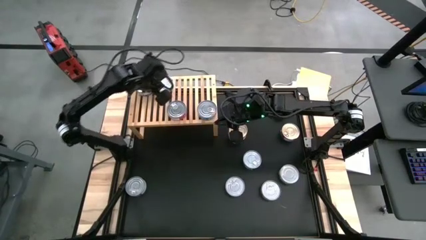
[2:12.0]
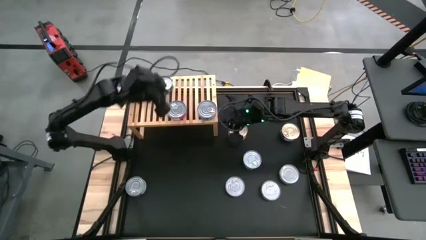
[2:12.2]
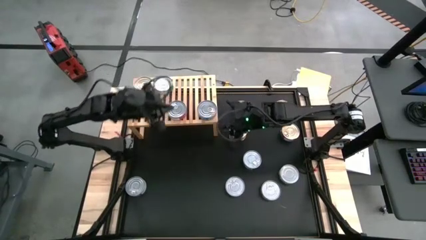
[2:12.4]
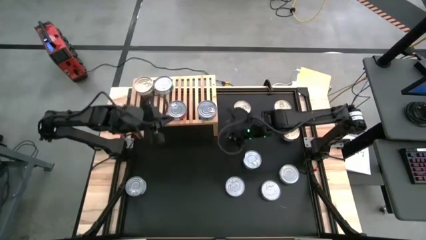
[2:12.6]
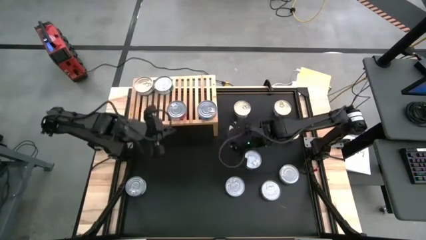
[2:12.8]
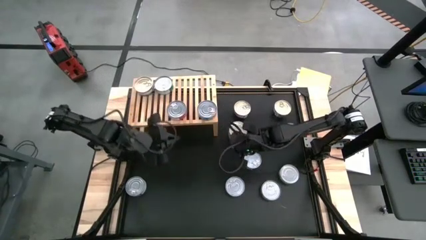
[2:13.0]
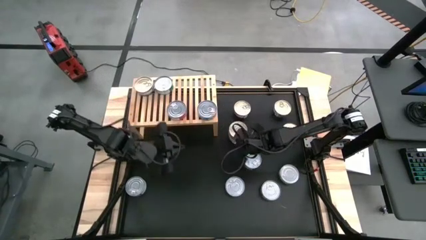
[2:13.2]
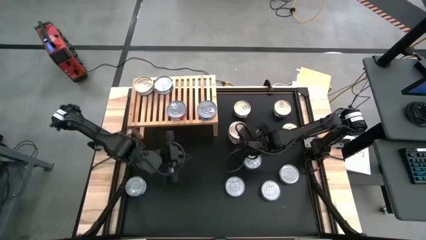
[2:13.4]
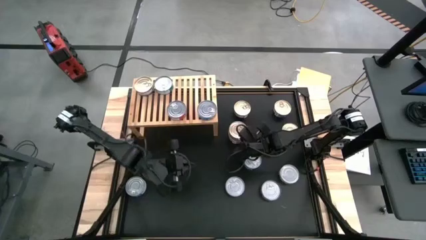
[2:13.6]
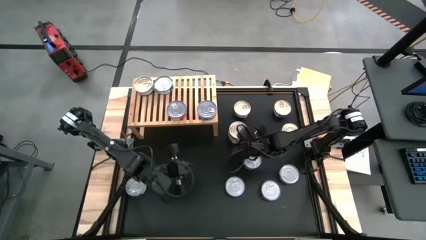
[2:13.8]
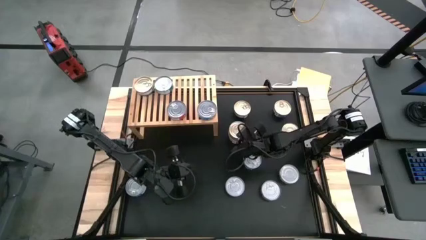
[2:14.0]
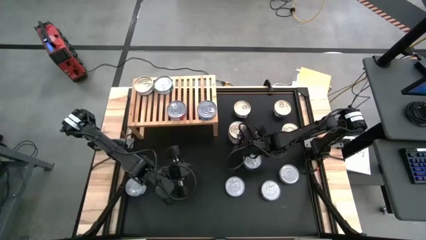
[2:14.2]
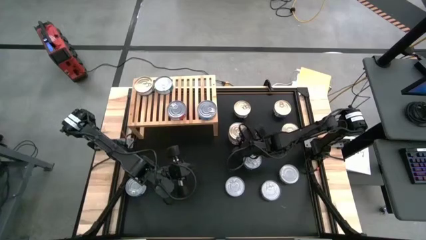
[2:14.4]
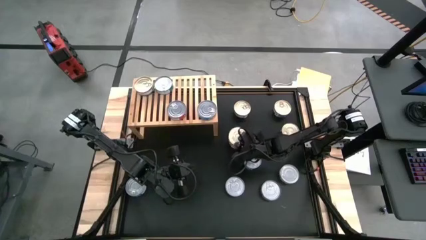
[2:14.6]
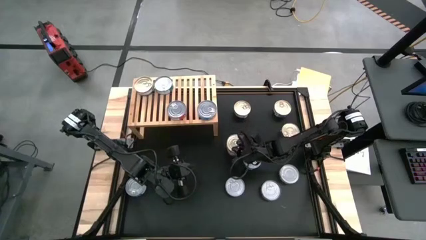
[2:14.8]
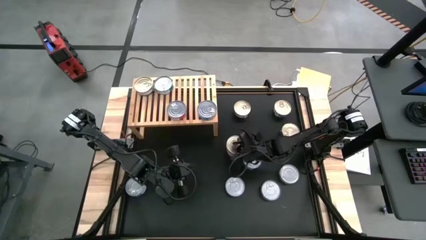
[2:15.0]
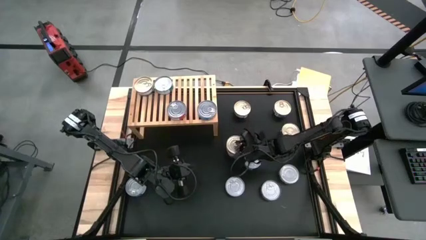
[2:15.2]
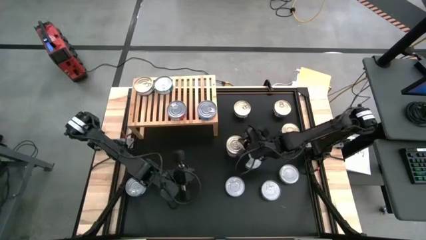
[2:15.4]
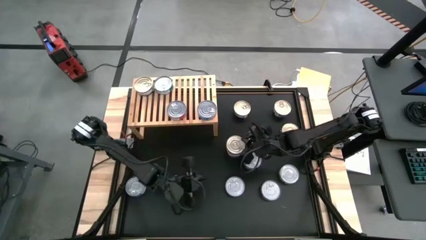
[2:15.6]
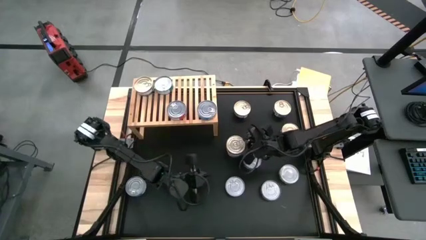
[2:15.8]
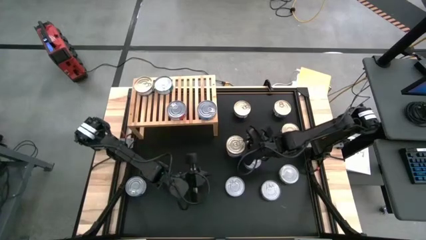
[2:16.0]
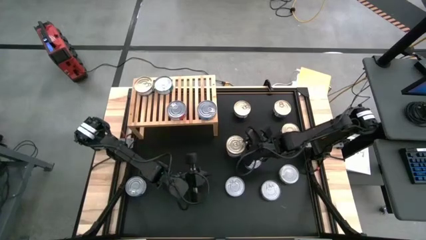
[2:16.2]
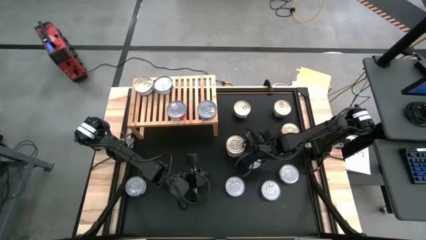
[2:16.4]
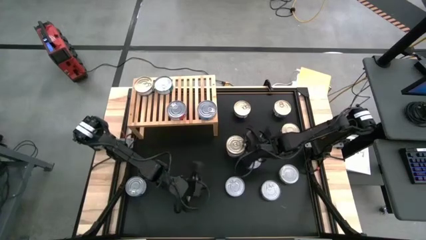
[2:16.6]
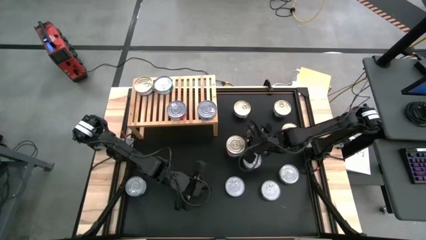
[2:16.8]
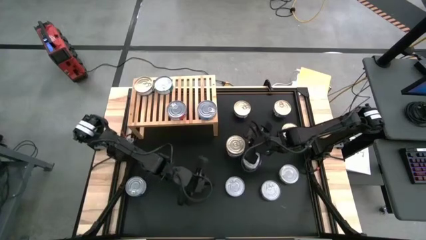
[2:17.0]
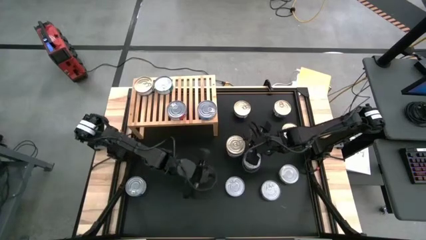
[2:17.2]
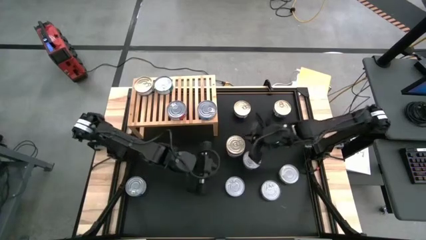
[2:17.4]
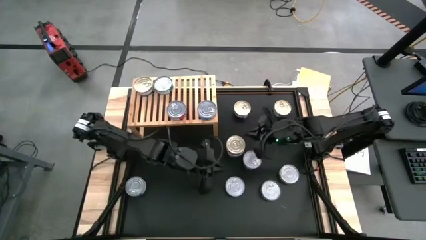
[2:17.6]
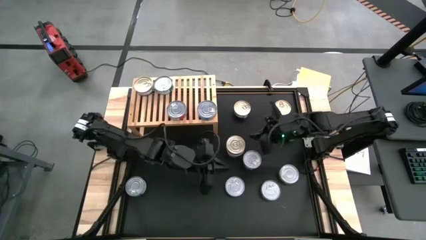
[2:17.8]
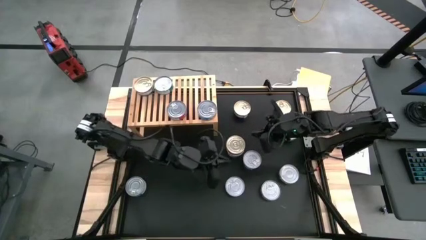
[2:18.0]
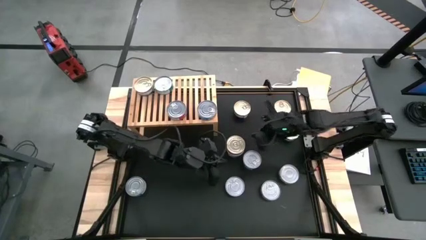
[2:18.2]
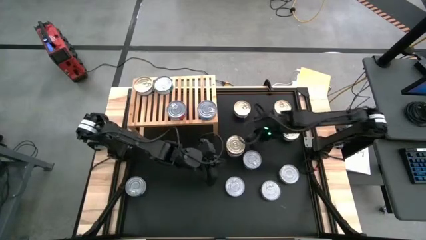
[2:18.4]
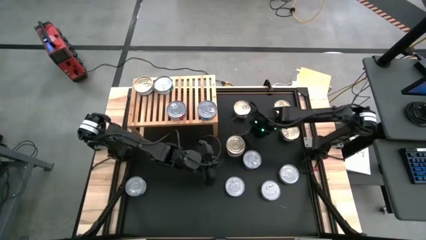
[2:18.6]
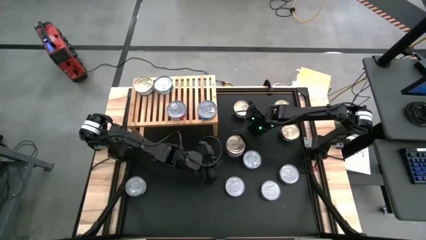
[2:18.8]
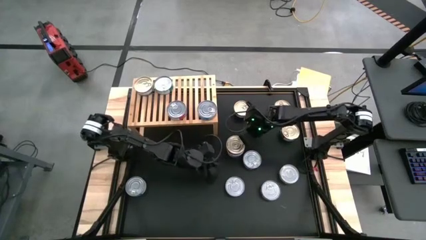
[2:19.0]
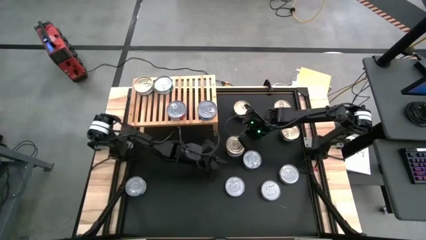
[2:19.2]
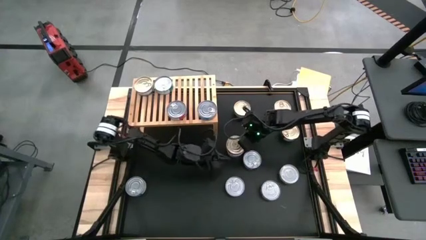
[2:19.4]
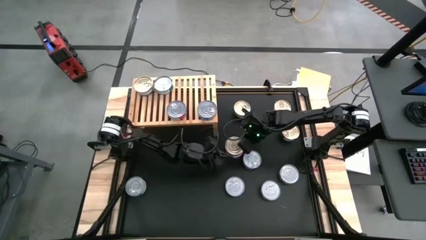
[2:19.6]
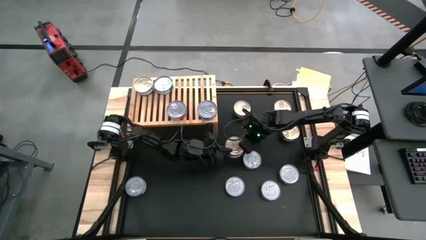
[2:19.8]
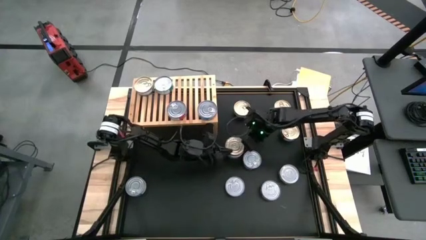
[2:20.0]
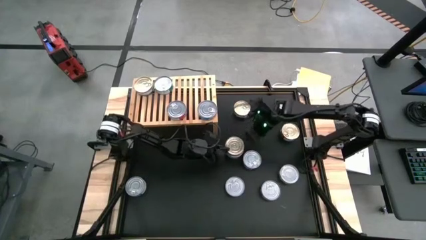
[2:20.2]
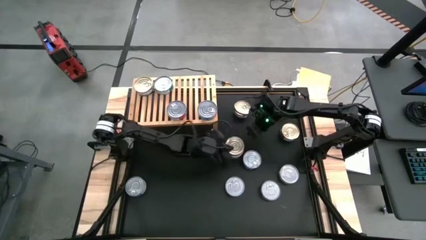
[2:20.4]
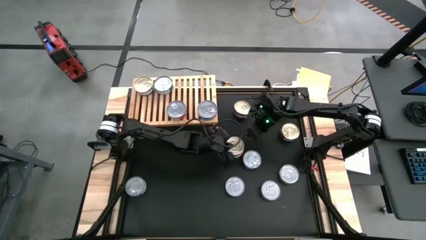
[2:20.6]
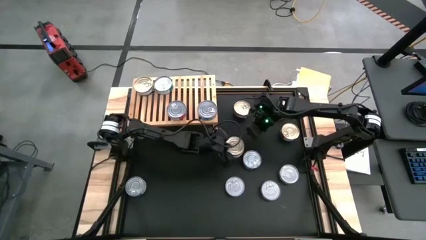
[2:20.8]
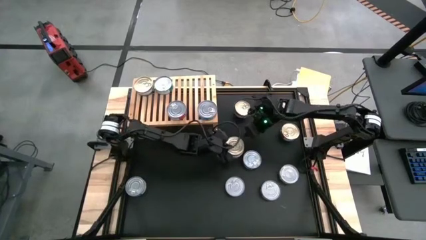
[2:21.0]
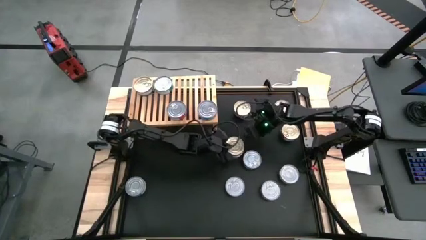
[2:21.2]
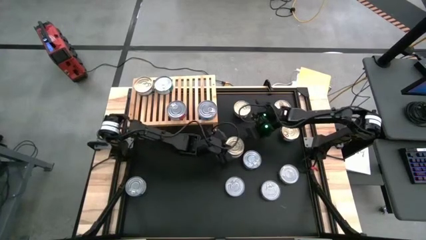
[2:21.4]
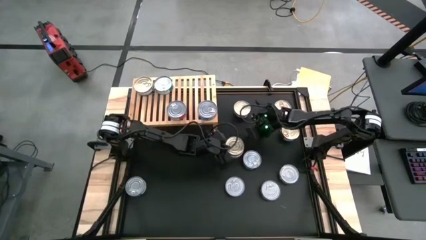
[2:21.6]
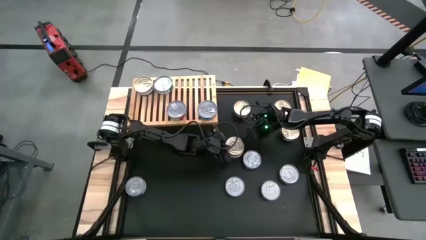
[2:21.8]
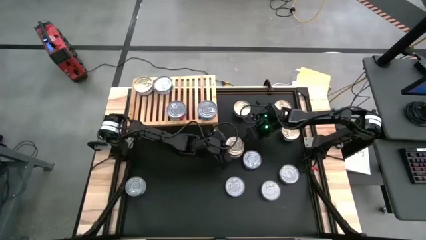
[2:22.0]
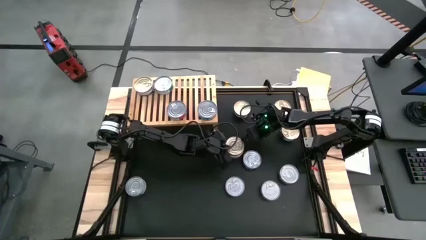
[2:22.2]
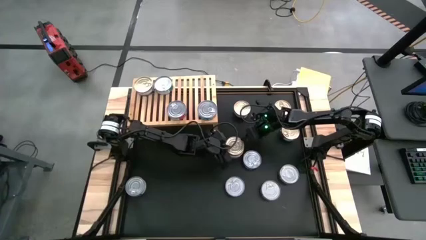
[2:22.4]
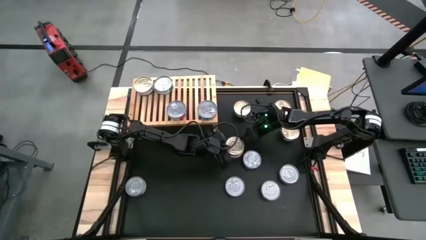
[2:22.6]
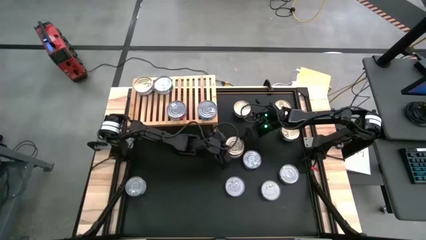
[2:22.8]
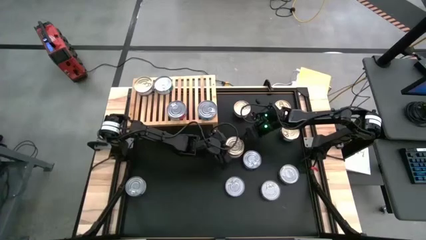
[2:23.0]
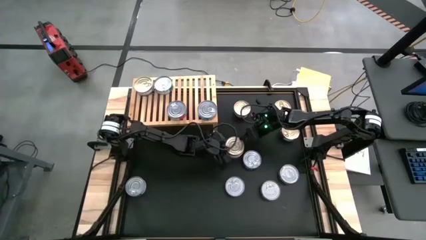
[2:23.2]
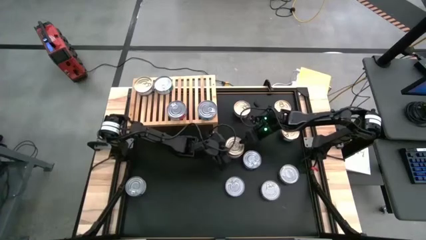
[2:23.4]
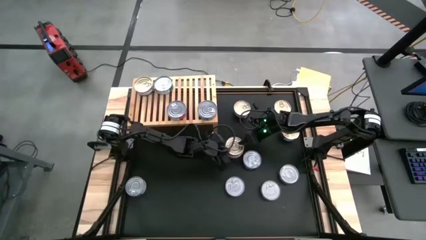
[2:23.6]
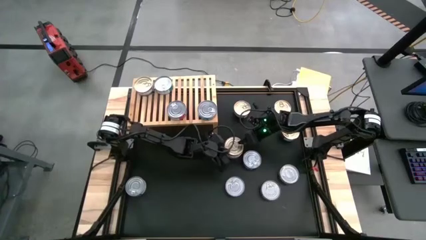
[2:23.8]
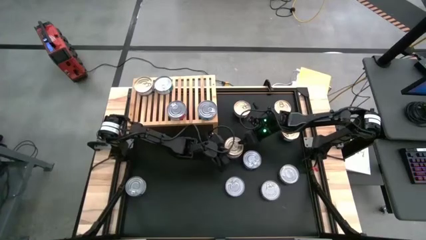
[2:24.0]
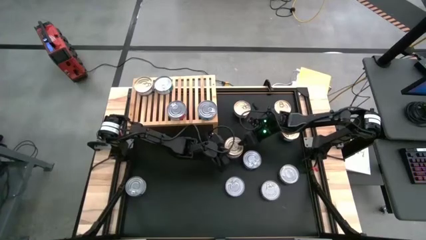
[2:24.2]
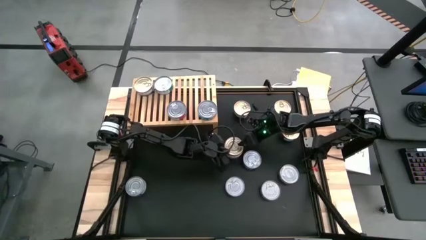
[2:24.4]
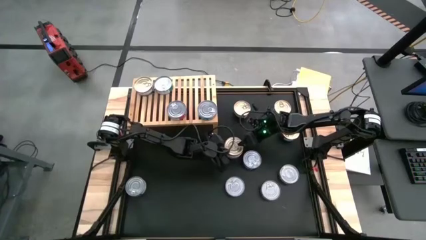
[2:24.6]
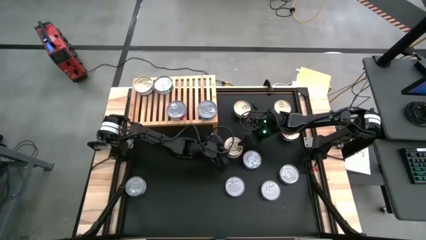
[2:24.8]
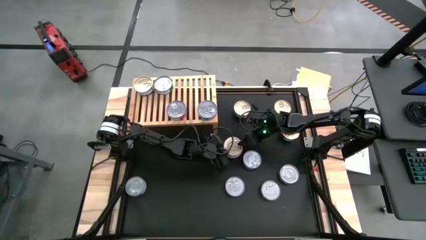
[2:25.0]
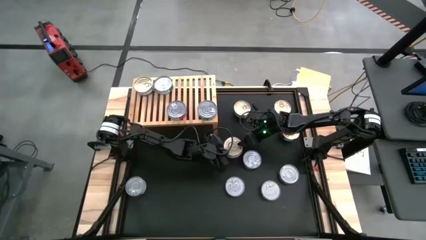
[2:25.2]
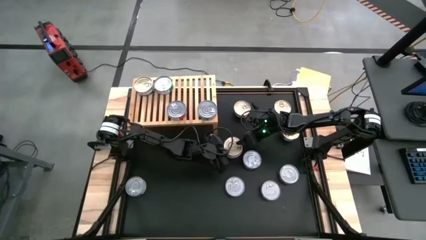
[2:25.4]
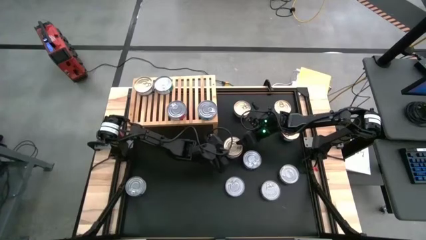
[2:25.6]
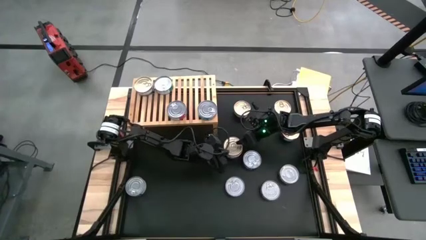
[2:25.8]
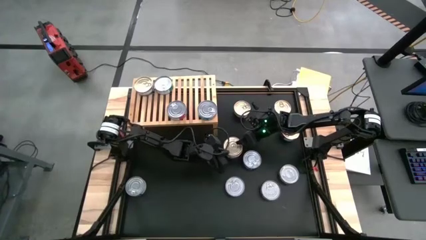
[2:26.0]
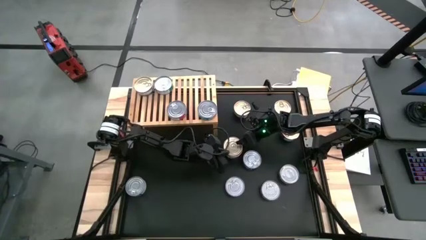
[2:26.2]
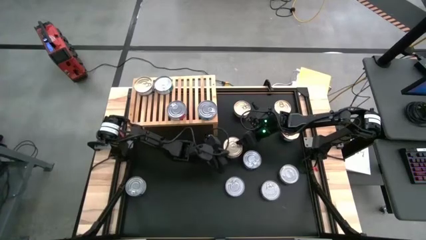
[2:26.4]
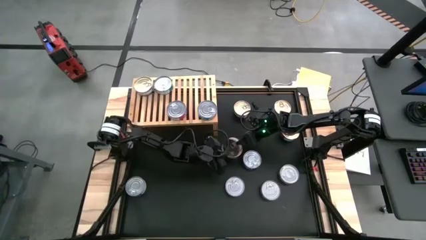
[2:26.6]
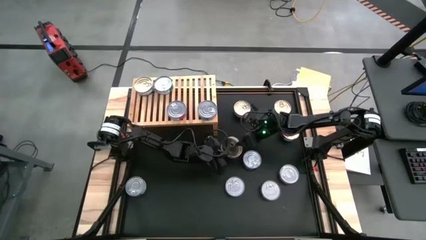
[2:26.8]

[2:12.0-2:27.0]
Task: Stack canned seafood by type on shelf
Put the blue pink tuna can on the shelf

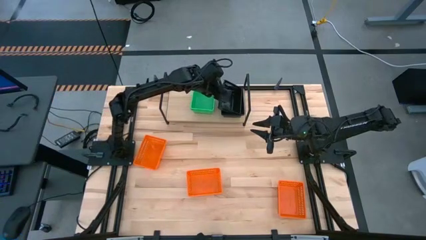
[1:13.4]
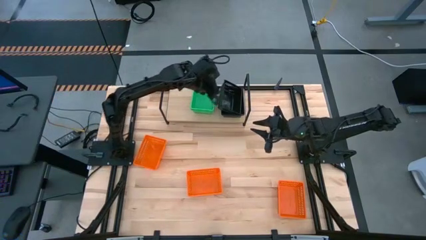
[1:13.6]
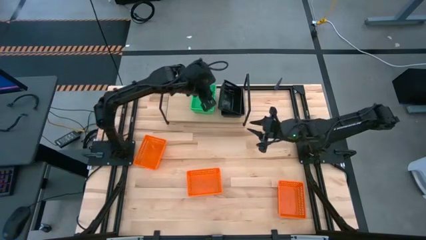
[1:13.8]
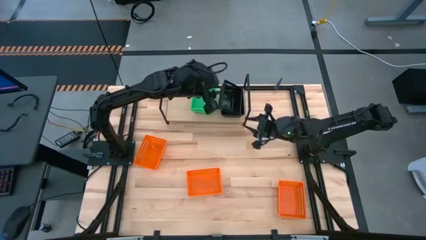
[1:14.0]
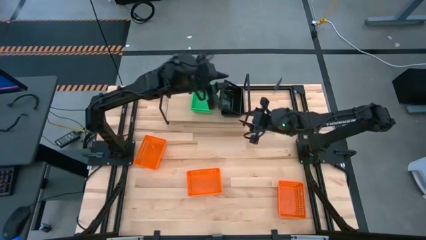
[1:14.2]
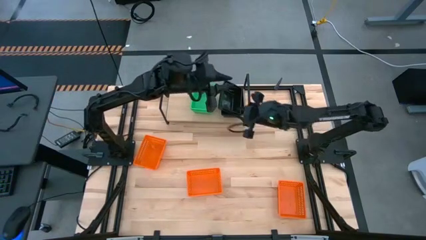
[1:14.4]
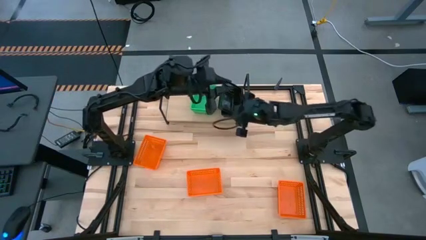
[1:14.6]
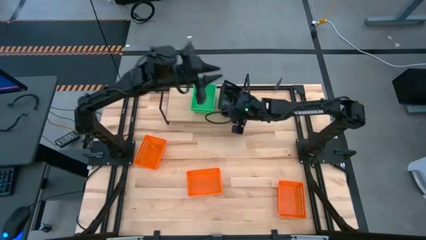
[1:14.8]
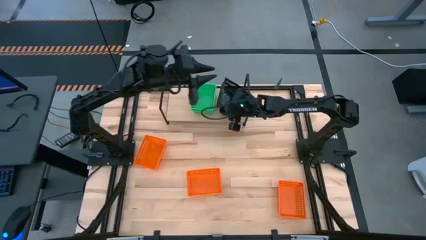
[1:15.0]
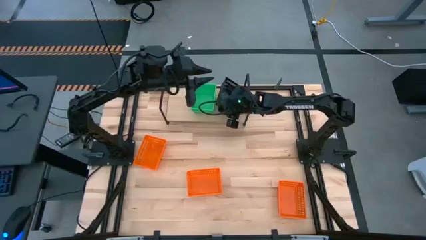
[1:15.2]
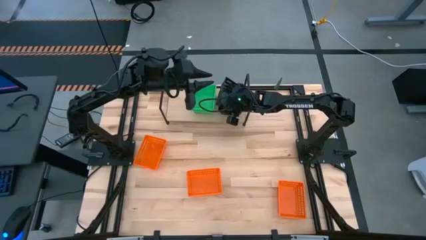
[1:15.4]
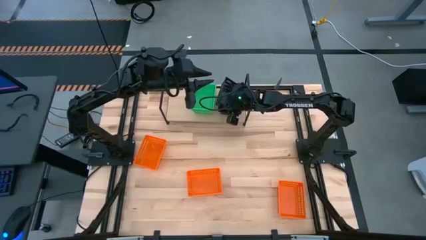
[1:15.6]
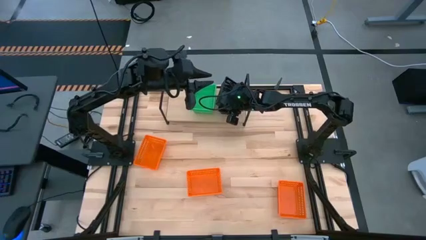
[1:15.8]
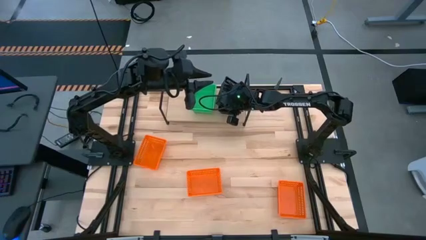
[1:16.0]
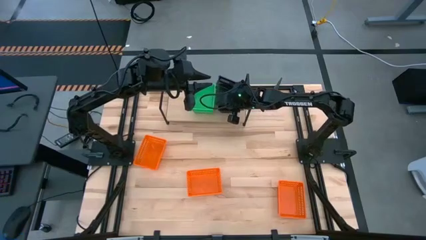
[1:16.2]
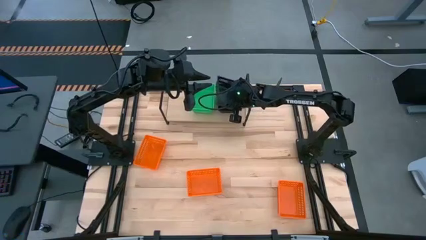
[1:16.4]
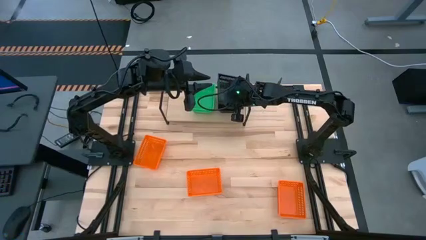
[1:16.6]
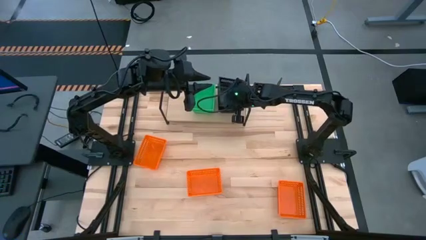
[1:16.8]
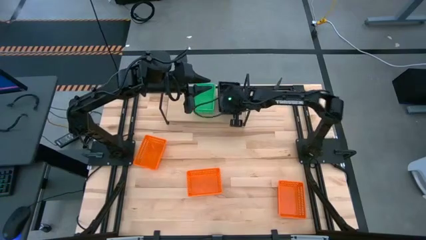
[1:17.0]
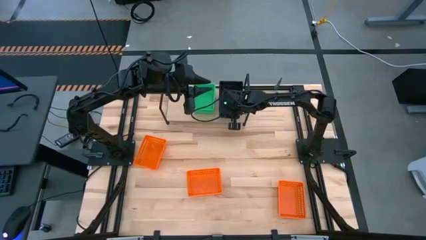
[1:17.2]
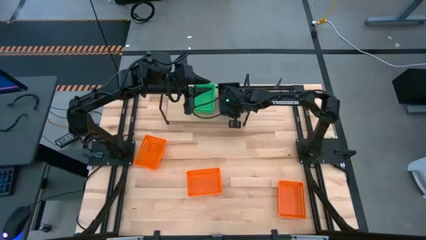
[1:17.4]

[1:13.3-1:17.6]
Task: Stack baskets on shelf by color
Stack the black bin on top of the stacked black bin on the shelf
